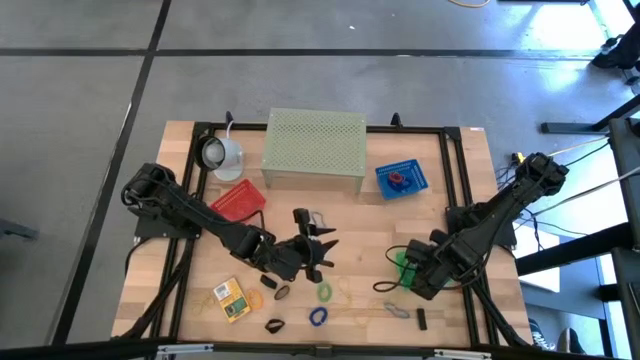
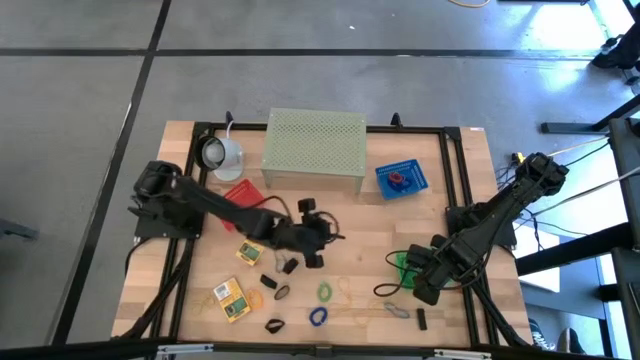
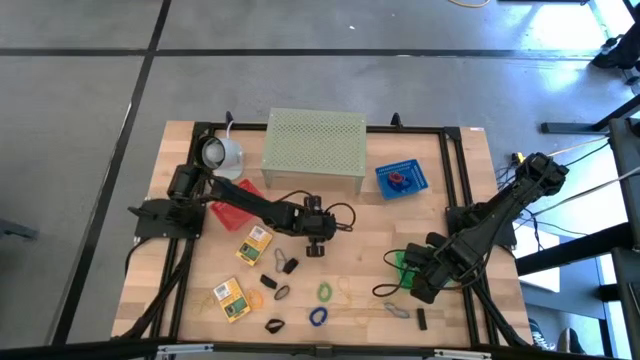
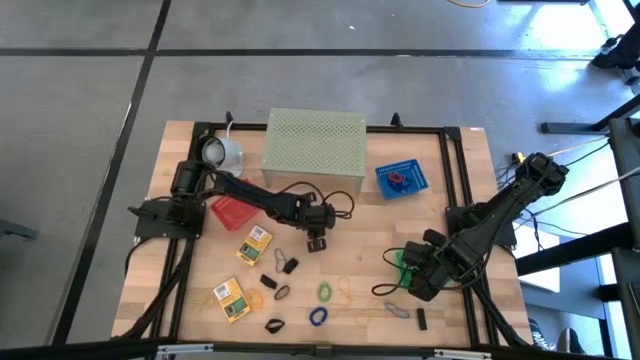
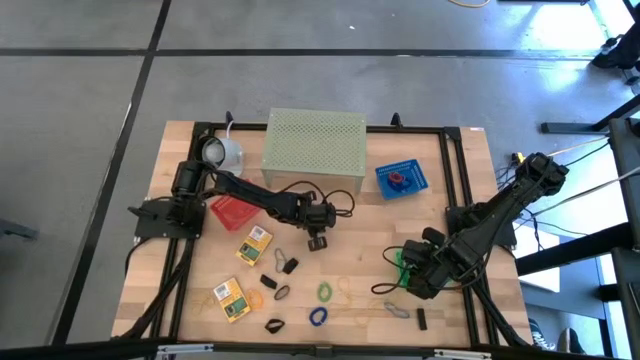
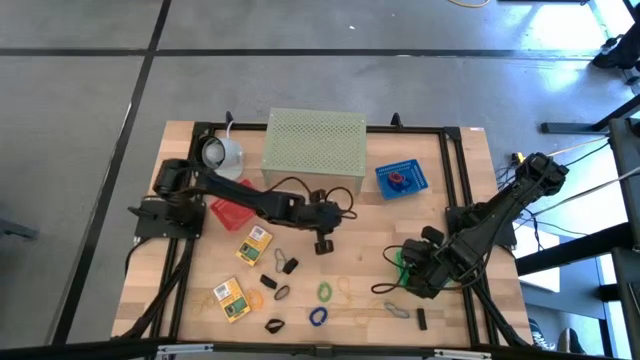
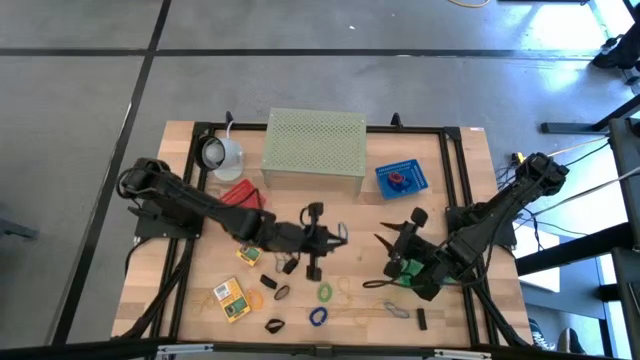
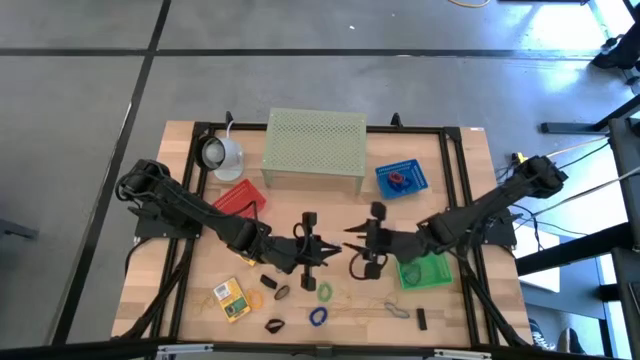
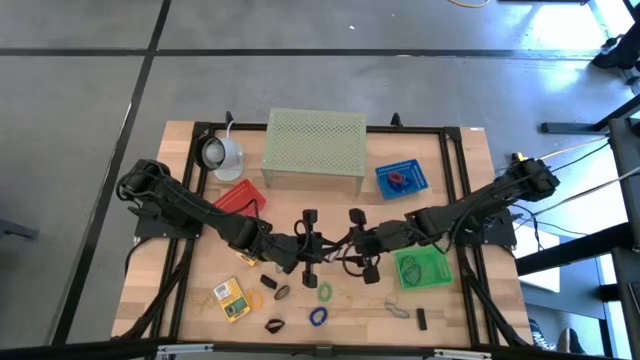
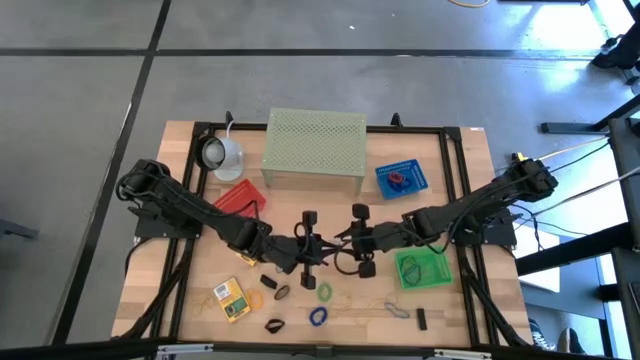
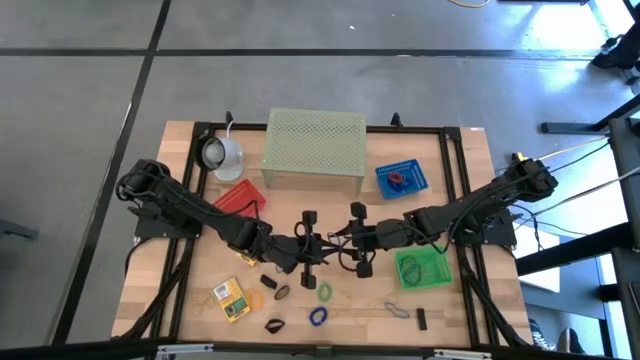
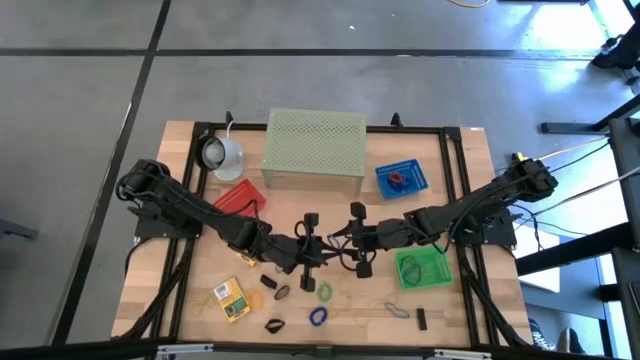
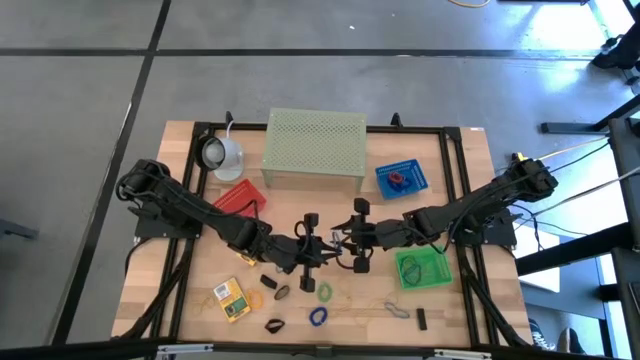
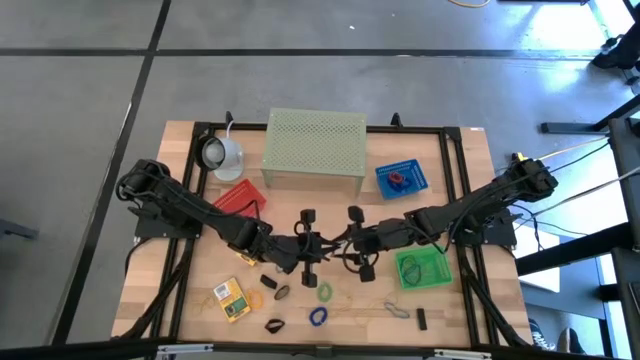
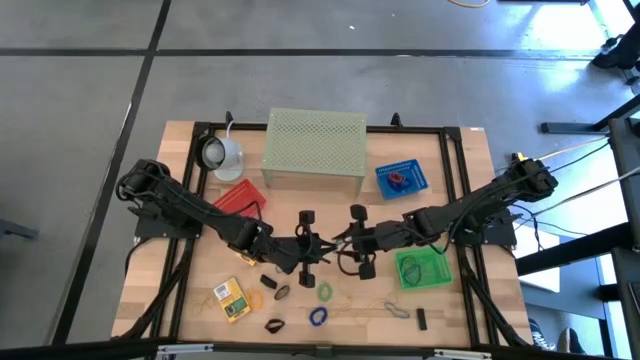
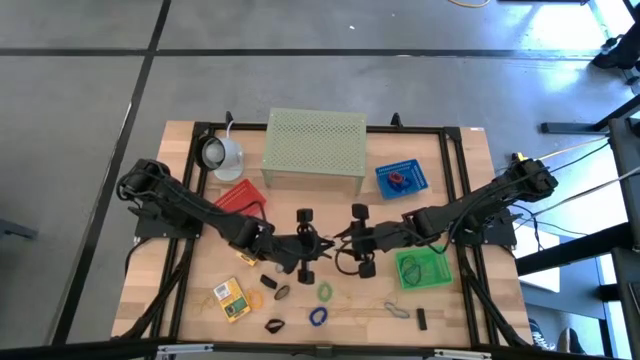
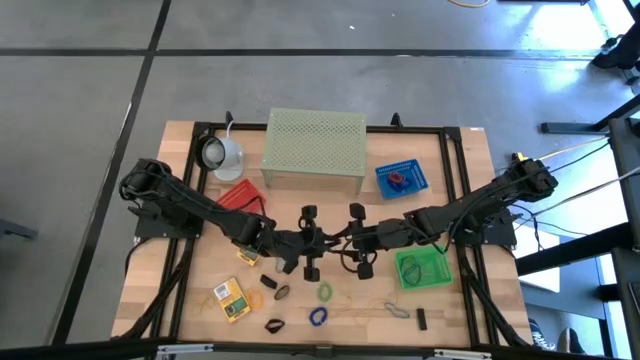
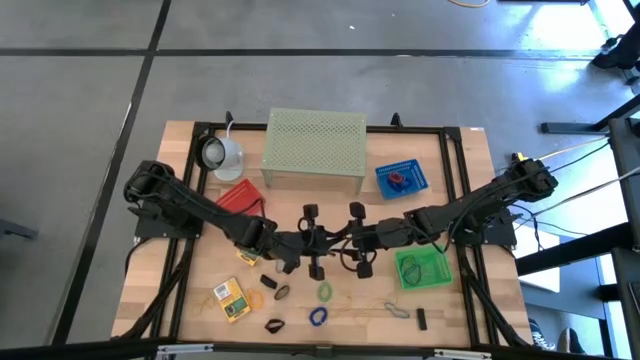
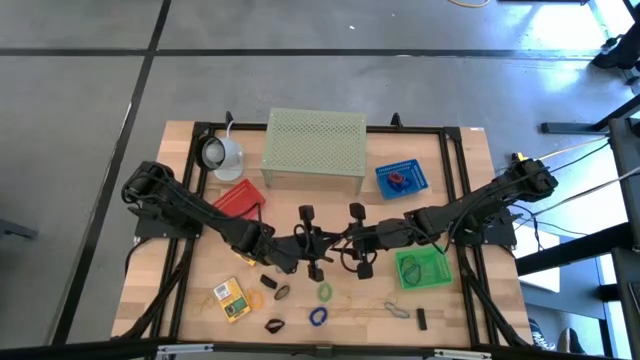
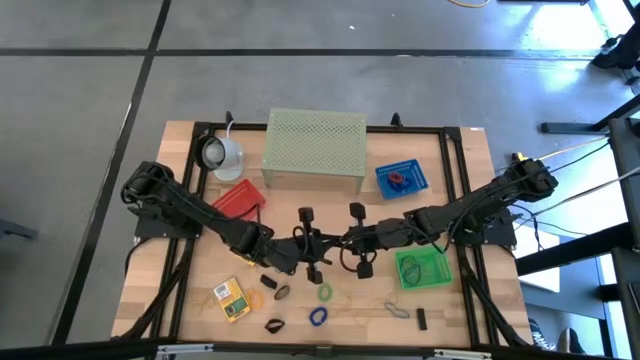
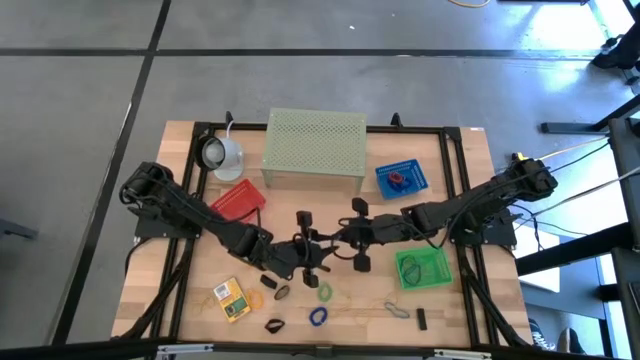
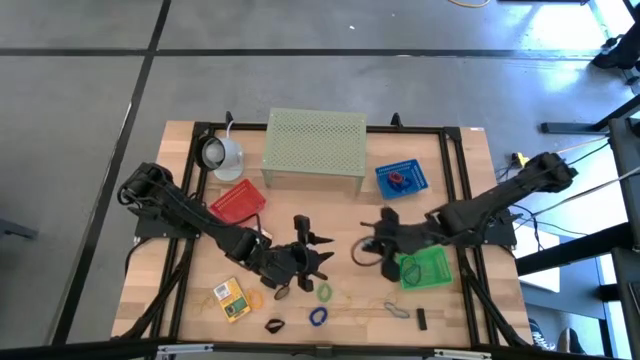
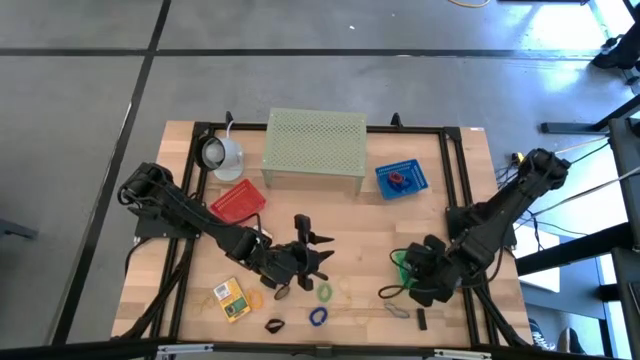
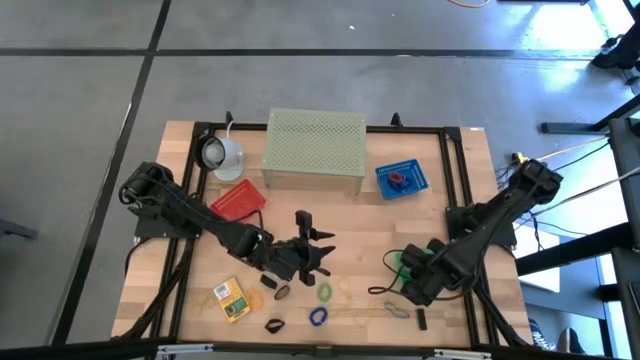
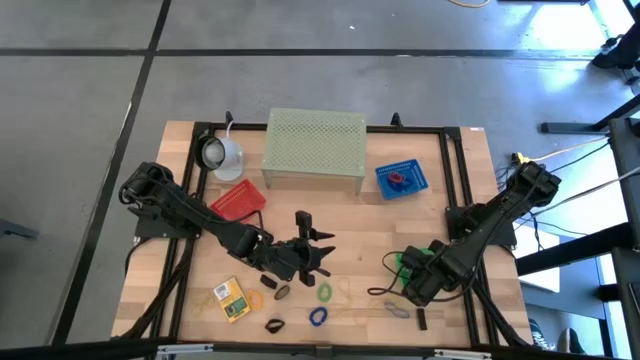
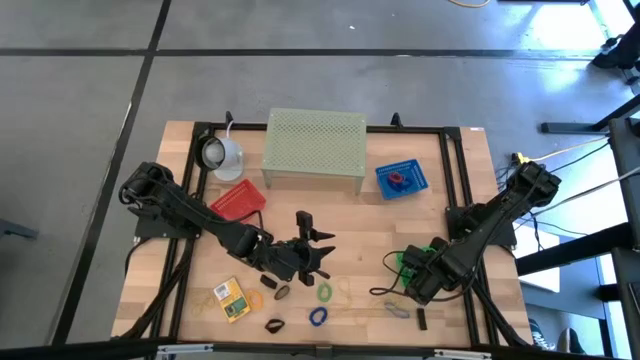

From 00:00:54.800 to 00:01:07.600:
Task: Pick & Place Office Desk Supplies
Put the blue rubber band into the green bin

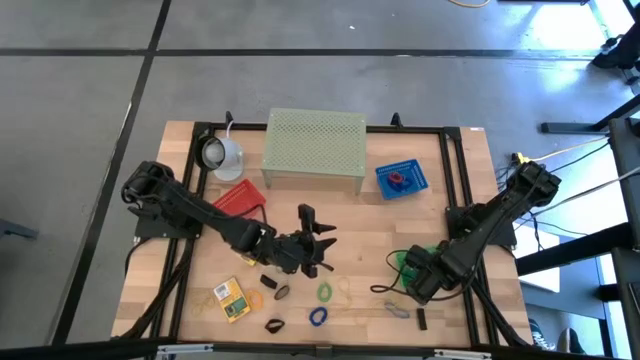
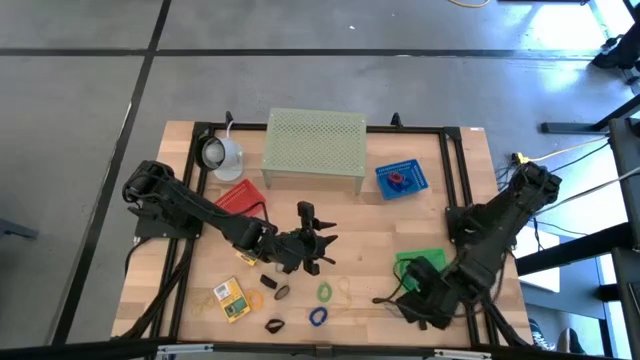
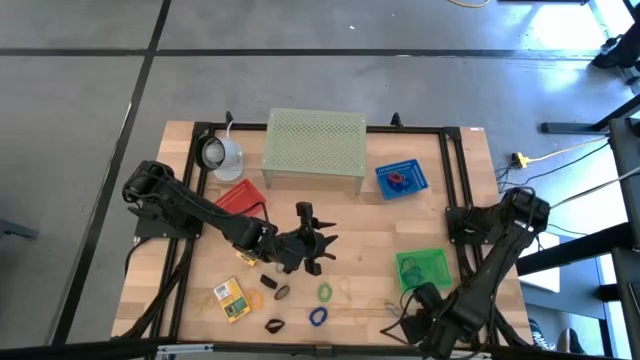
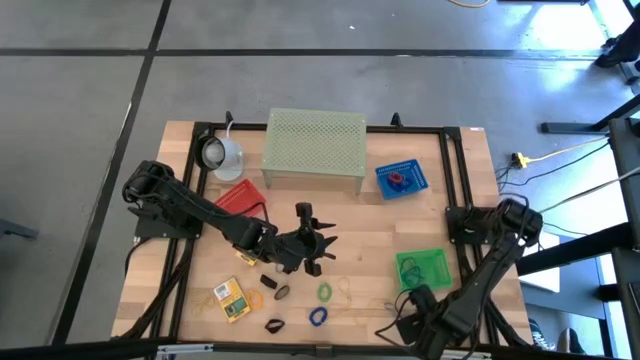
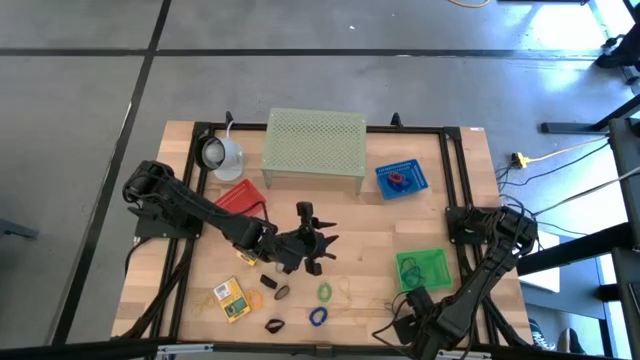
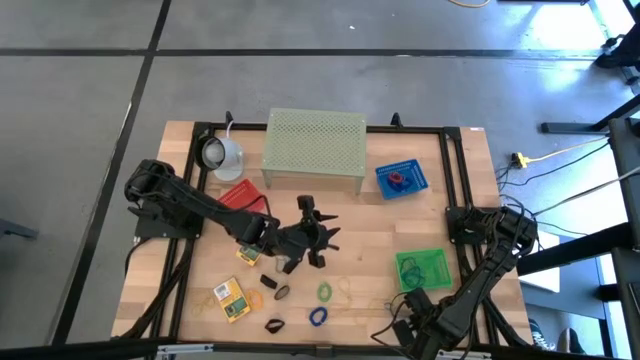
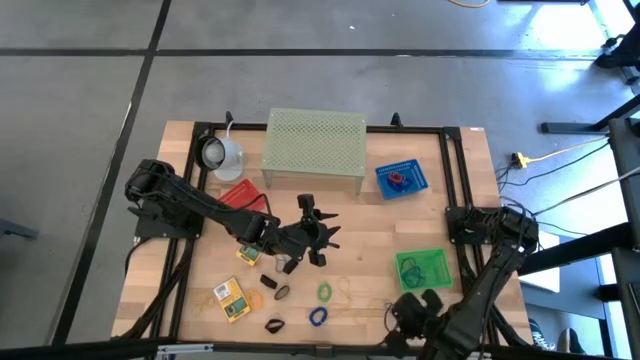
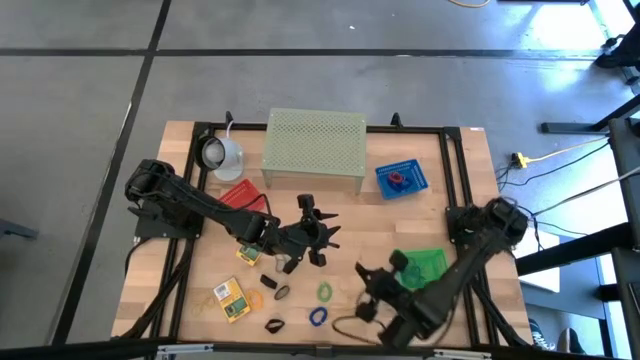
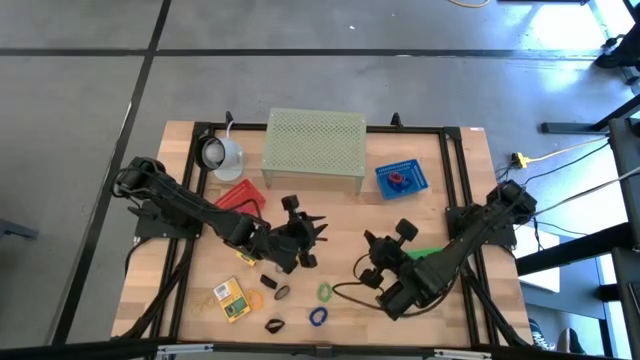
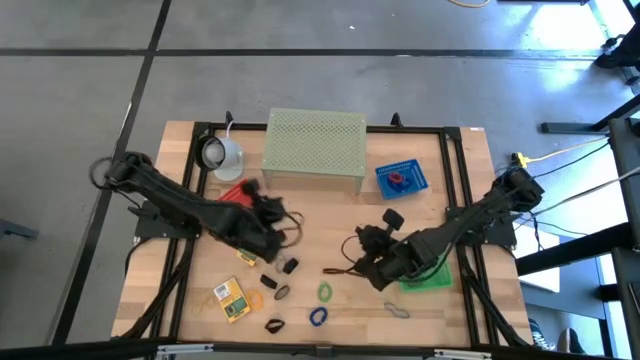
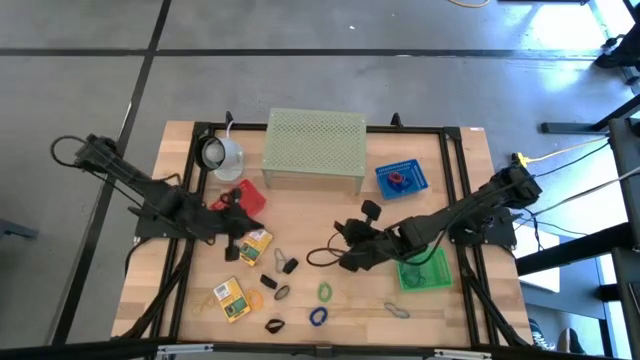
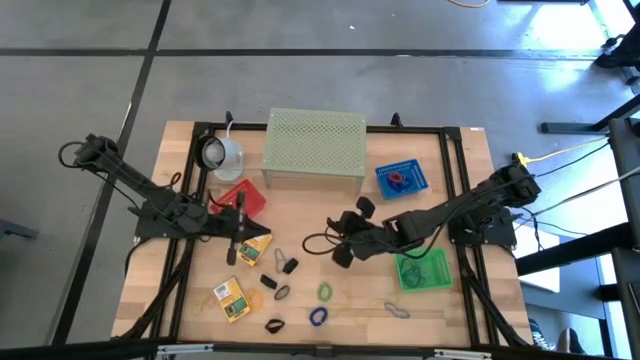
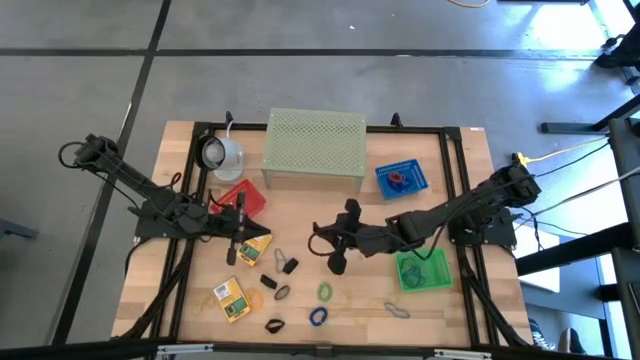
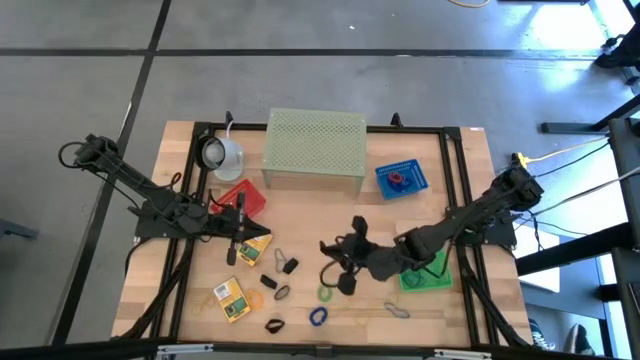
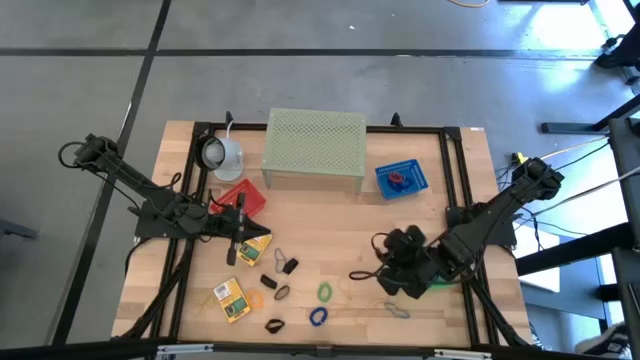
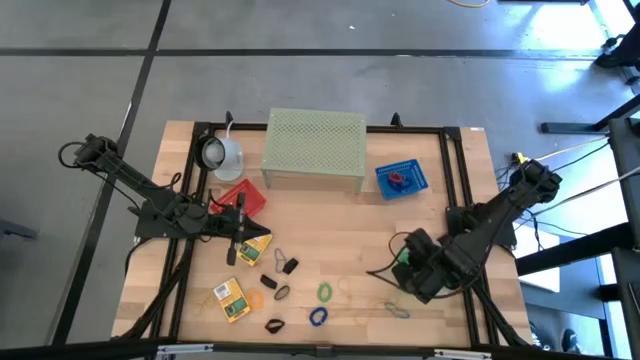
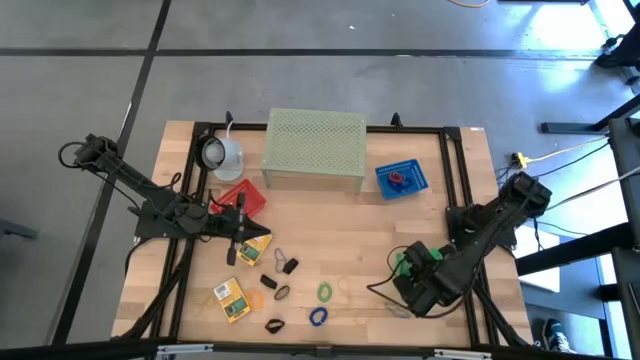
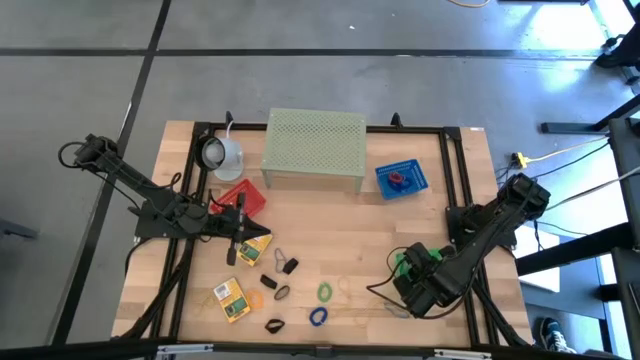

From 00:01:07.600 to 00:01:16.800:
Put the black rubber band into the green bin
